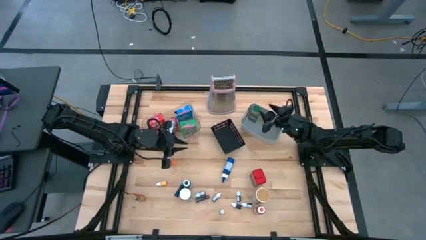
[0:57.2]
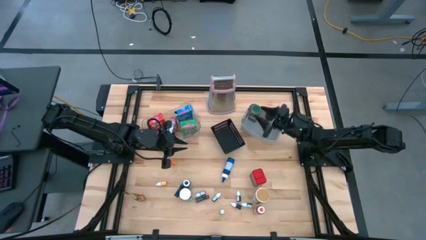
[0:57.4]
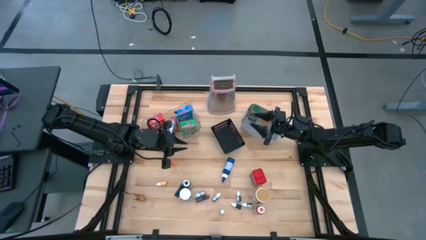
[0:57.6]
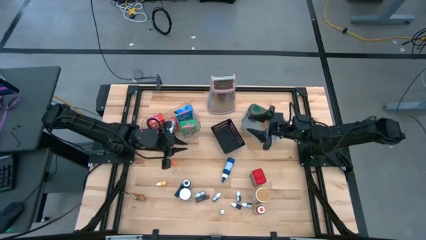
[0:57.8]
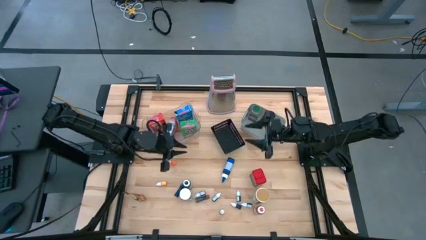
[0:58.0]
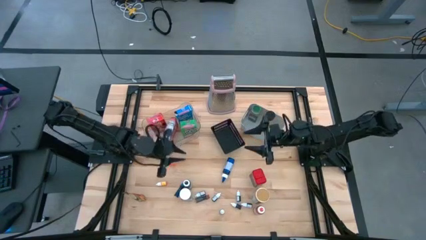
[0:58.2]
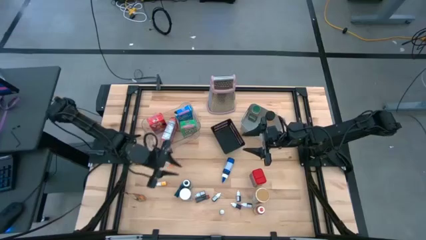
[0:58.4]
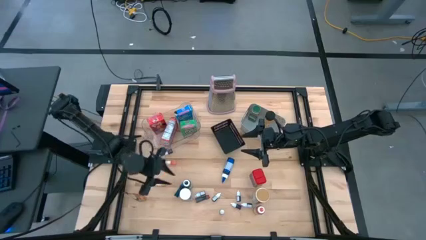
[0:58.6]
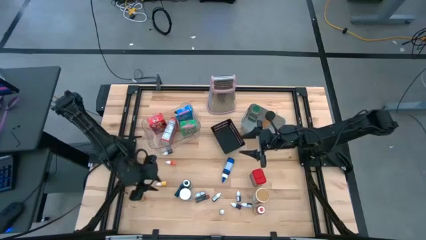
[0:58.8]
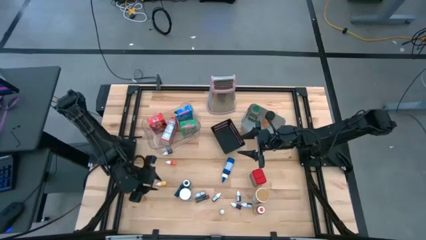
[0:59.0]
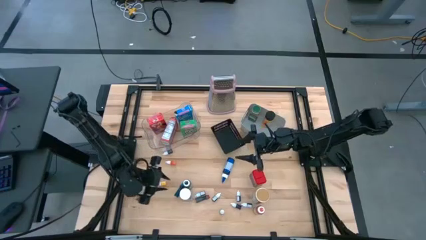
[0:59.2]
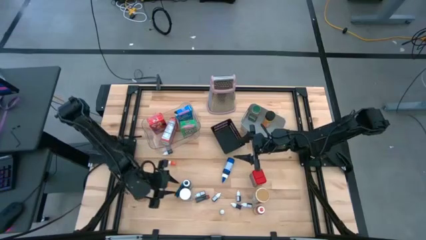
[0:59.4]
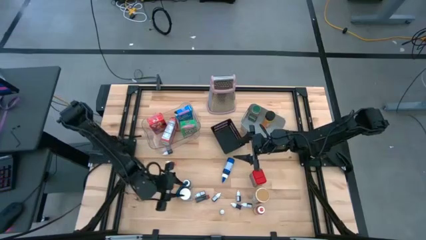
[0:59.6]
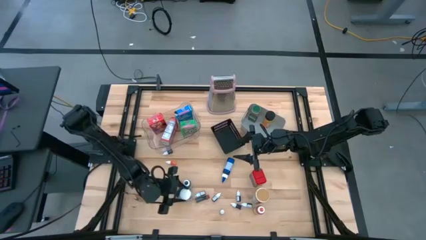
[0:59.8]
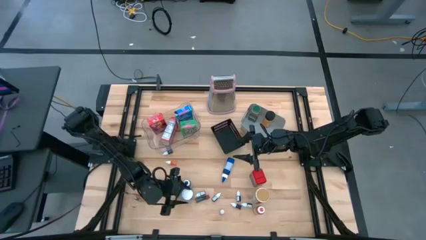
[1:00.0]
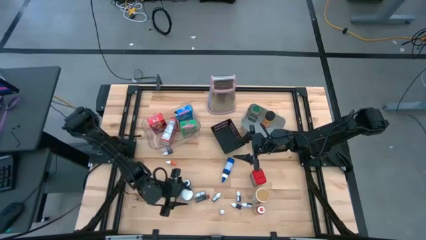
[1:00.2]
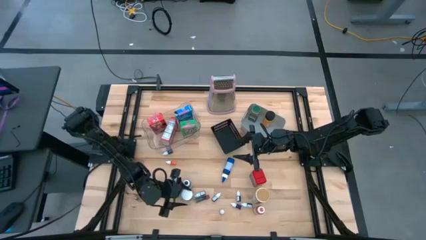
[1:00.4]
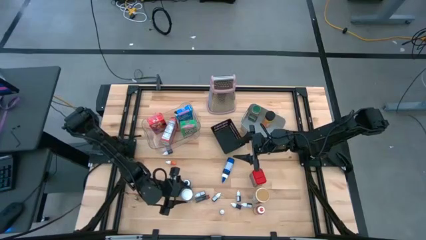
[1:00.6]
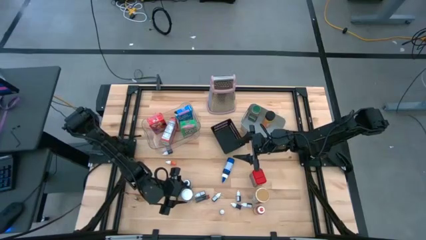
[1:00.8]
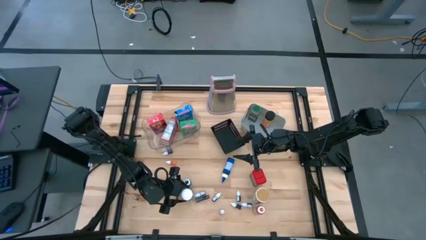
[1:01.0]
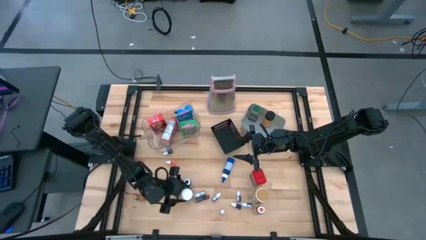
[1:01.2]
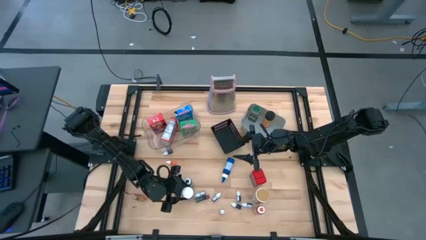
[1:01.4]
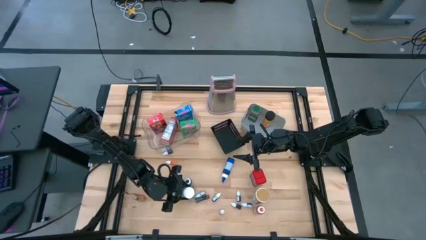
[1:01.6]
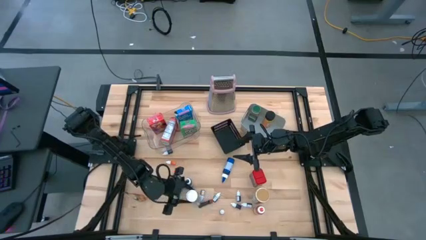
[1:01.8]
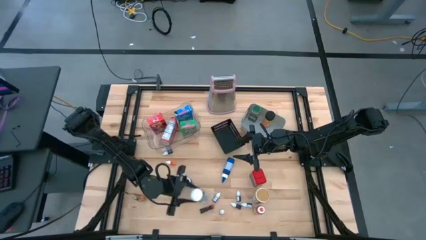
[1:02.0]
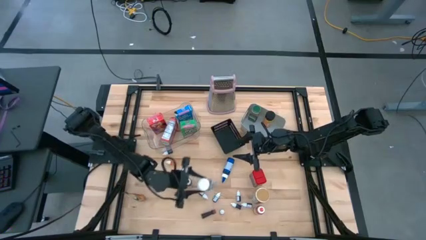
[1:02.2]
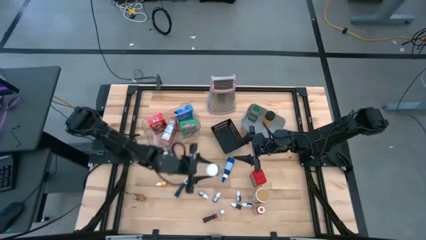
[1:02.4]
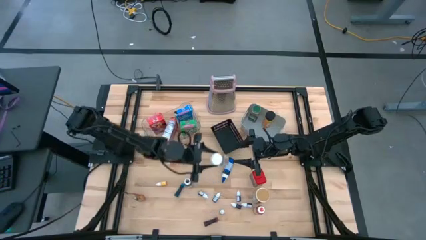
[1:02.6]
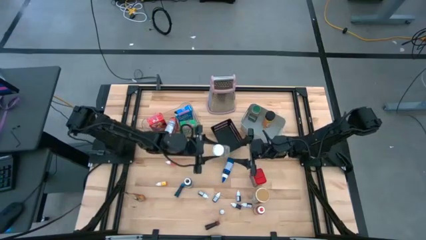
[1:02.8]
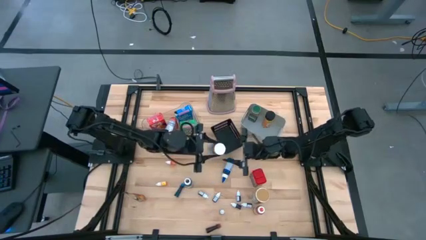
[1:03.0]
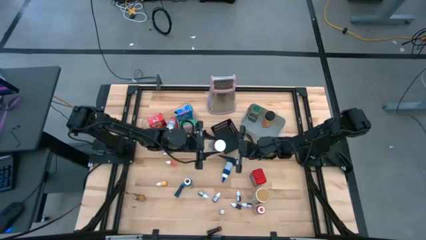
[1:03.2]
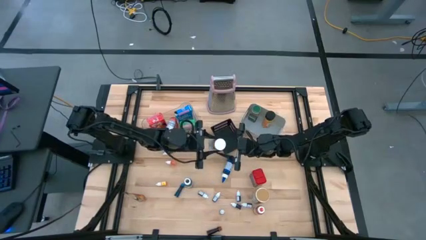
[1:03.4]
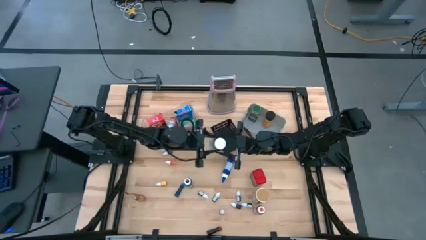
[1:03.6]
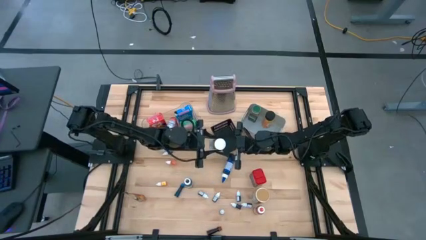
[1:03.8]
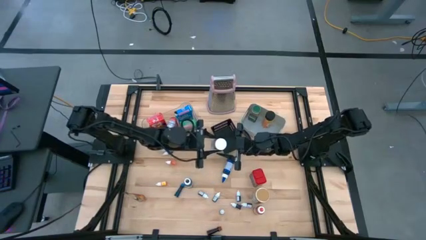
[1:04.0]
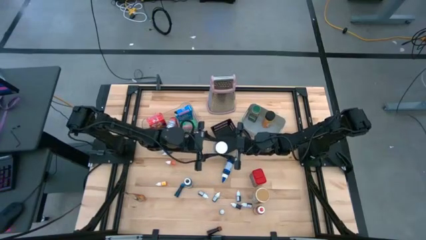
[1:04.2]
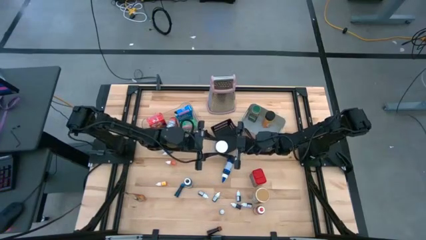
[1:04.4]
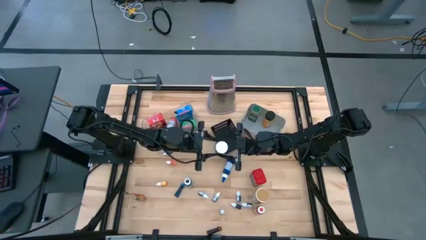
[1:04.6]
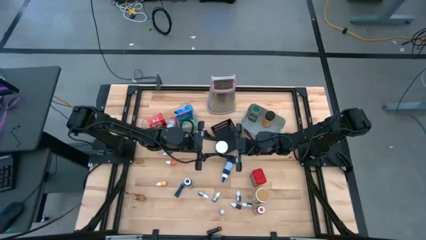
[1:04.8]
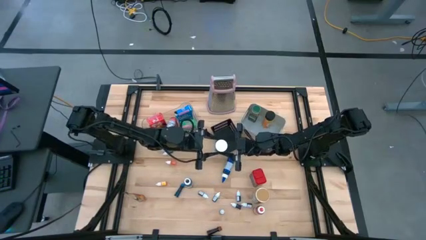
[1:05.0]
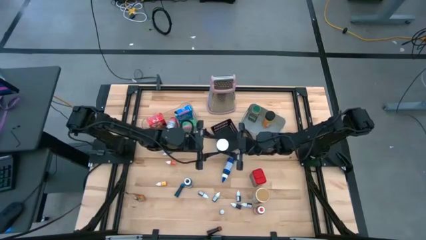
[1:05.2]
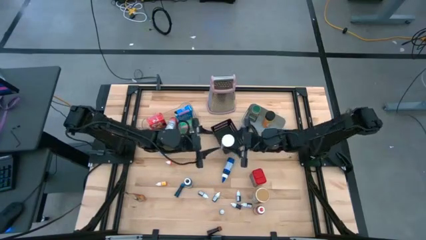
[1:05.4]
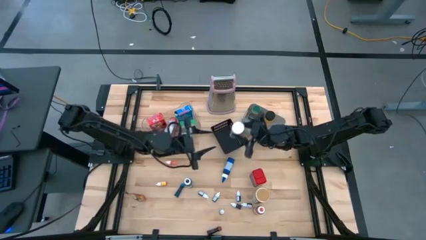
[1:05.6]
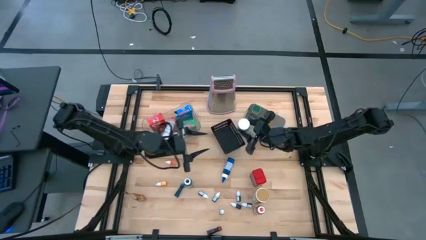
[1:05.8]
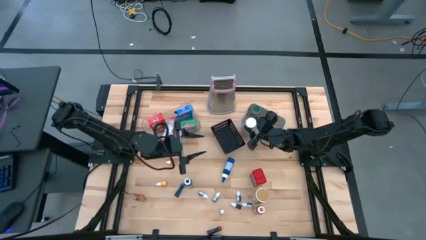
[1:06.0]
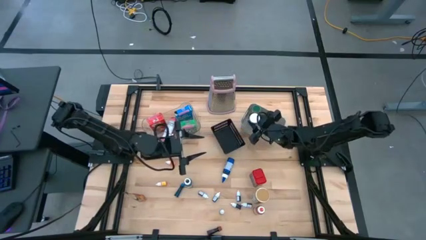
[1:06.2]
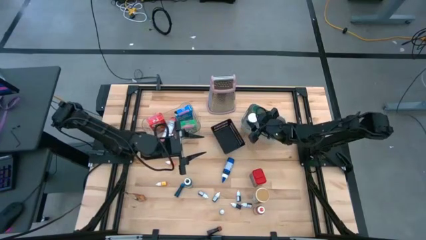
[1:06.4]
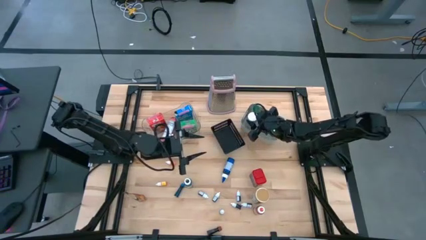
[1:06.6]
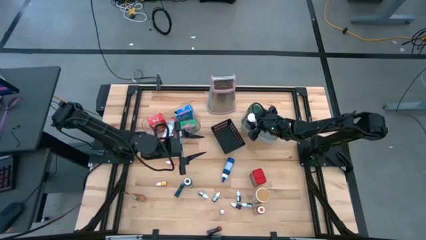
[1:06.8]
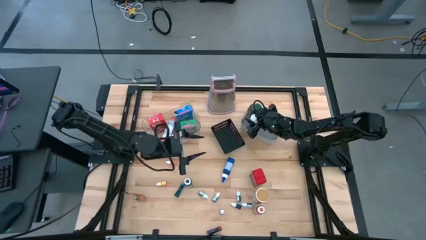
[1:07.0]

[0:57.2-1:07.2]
Task: Pick & Place Kitchen Items
Put the white seasoning bottle into the gray bin

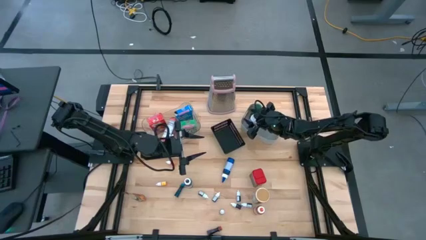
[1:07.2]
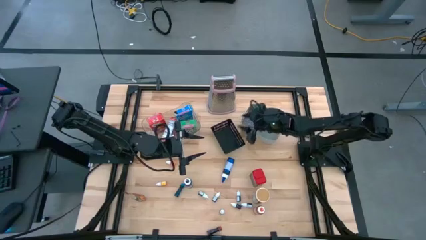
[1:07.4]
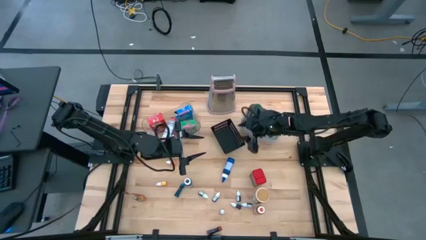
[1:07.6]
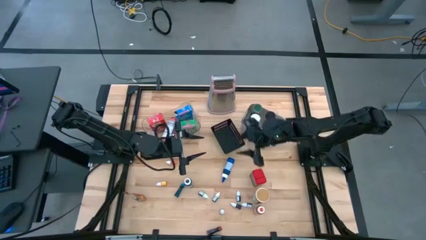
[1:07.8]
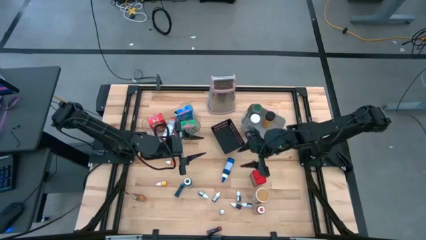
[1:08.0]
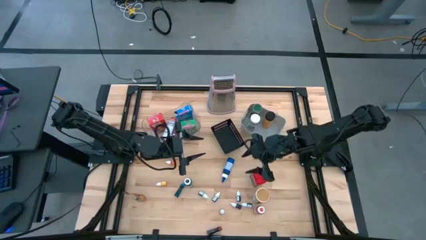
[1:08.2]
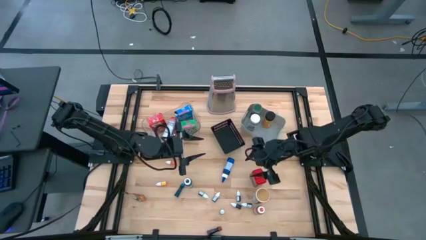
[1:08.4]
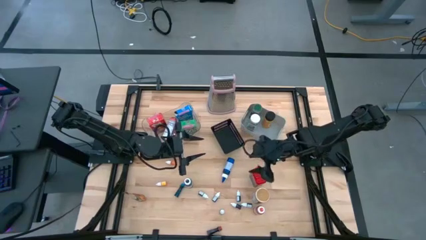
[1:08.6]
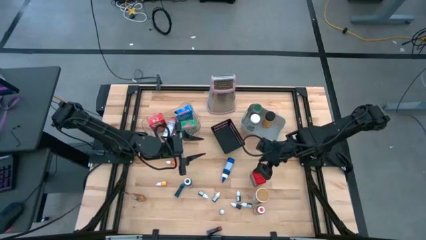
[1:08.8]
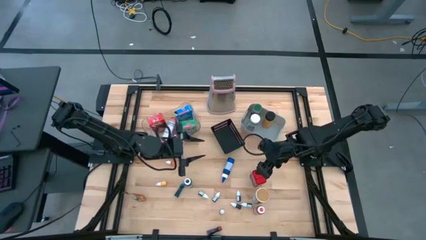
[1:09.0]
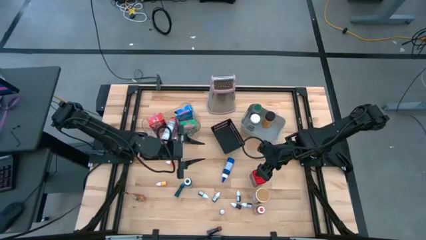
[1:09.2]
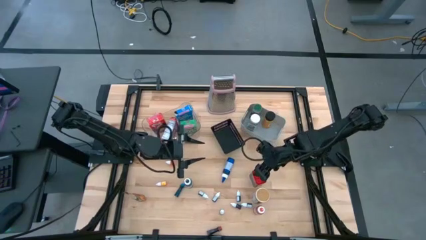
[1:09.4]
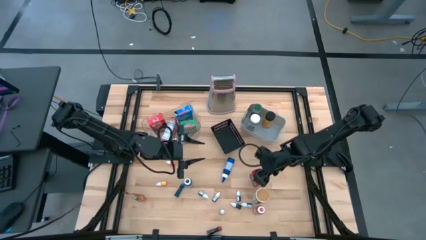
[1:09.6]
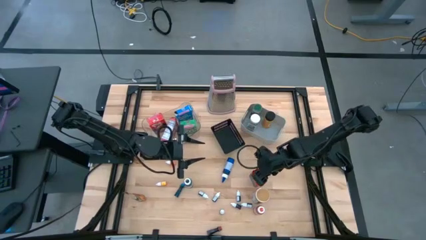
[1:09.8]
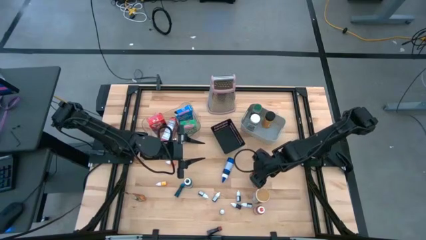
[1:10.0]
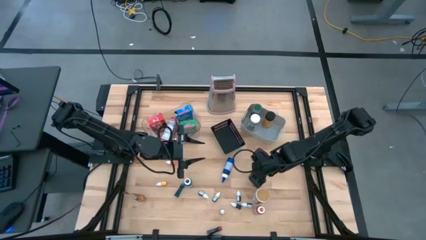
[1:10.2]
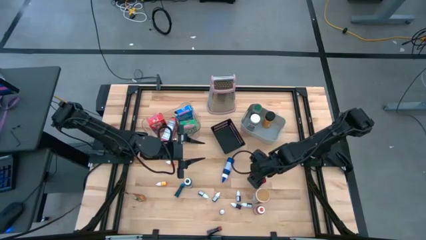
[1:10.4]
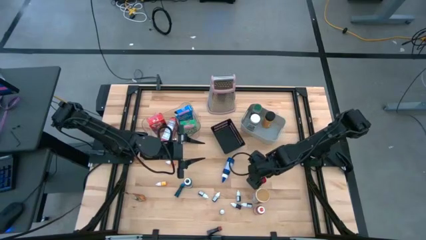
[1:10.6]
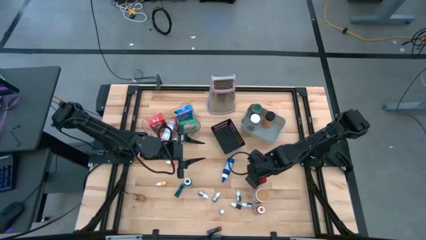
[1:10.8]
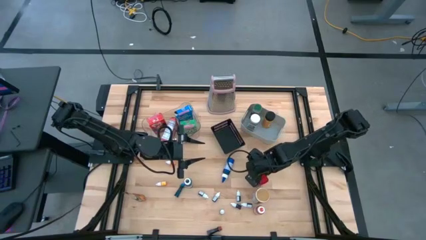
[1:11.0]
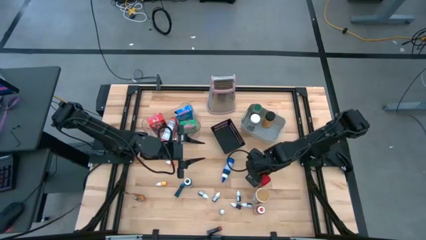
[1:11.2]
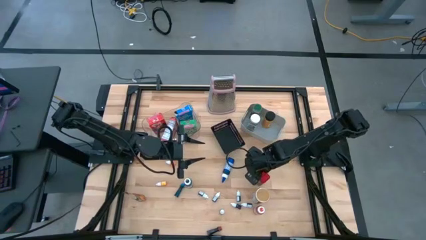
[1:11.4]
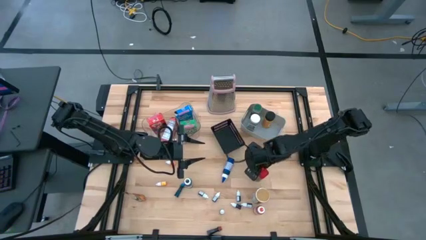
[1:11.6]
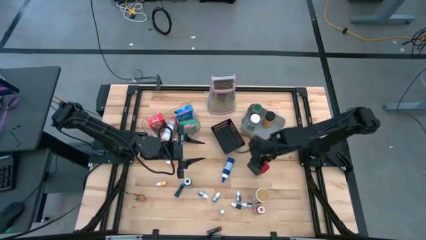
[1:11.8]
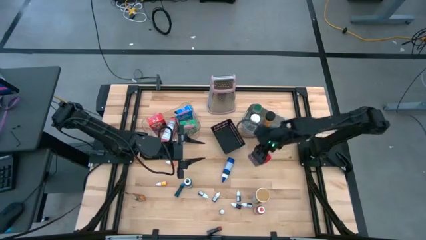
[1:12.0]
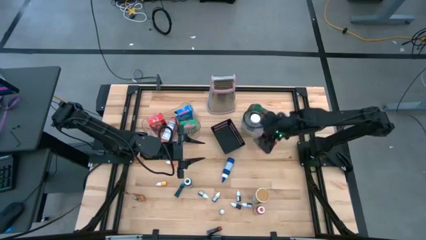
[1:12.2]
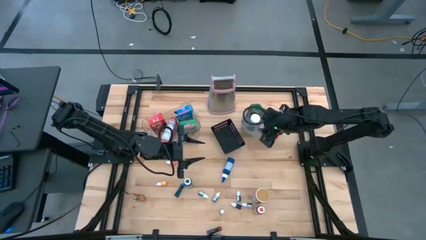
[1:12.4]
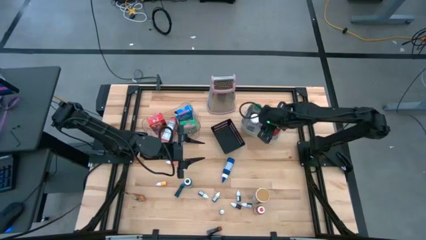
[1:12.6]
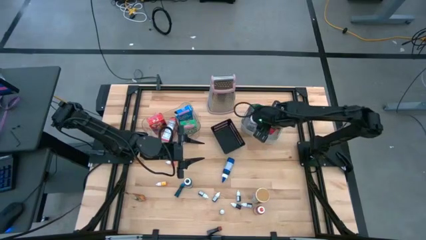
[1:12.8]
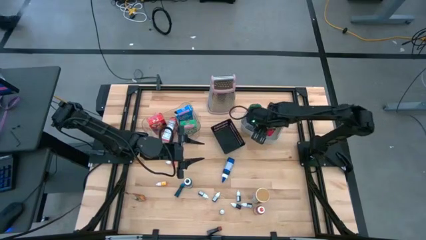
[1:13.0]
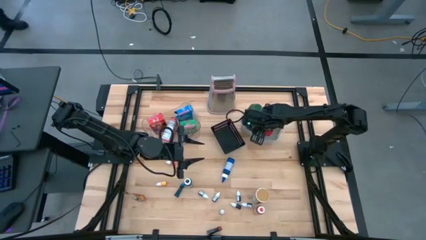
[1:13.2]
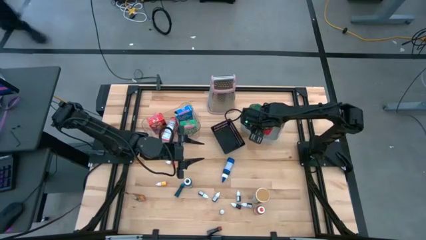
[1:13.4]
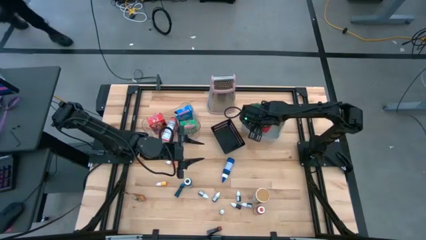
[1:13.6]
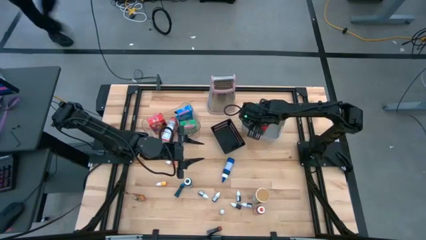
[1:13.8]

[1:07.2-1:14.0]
Put the red seasoning can into the gray bin
